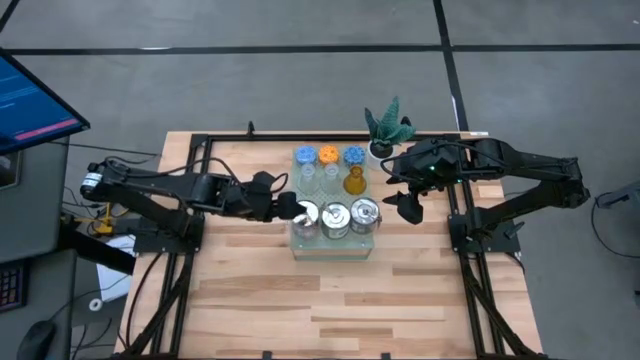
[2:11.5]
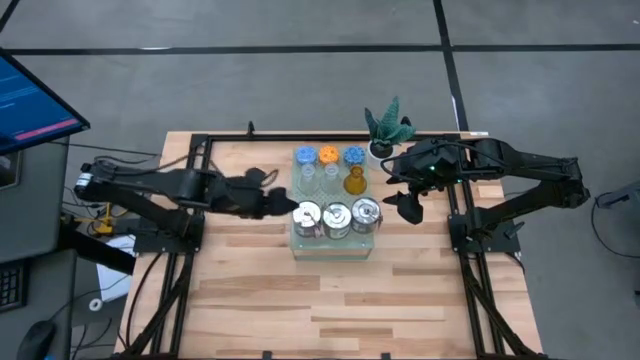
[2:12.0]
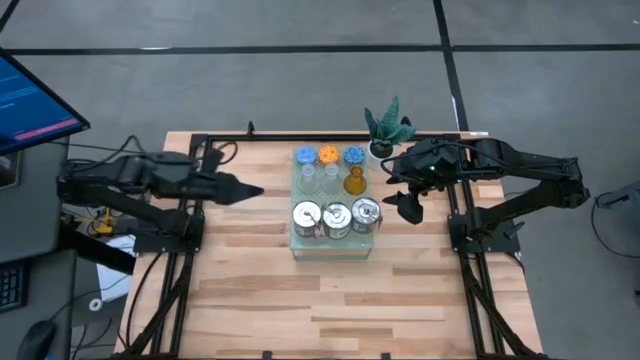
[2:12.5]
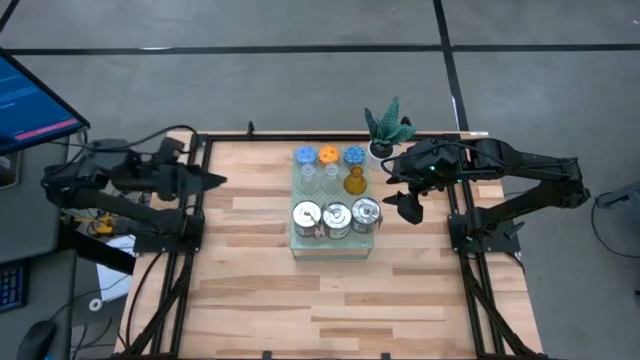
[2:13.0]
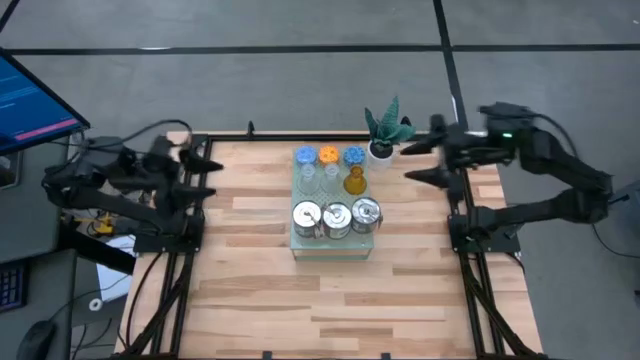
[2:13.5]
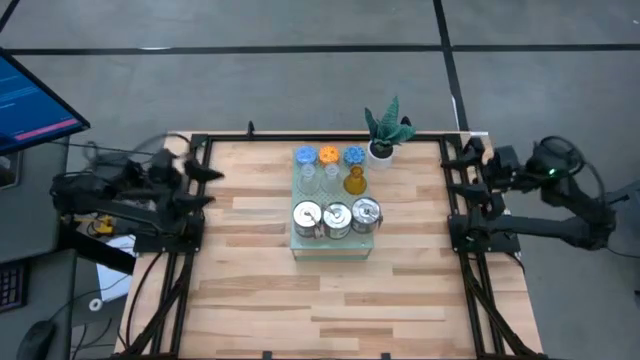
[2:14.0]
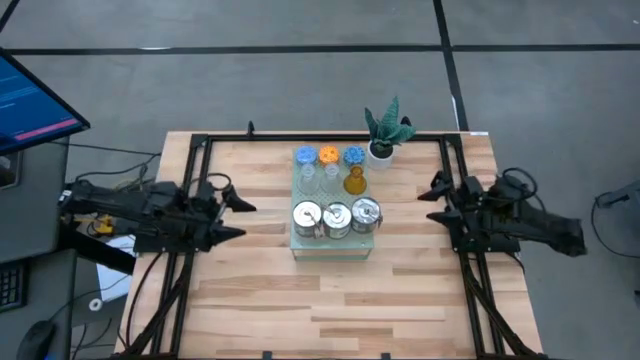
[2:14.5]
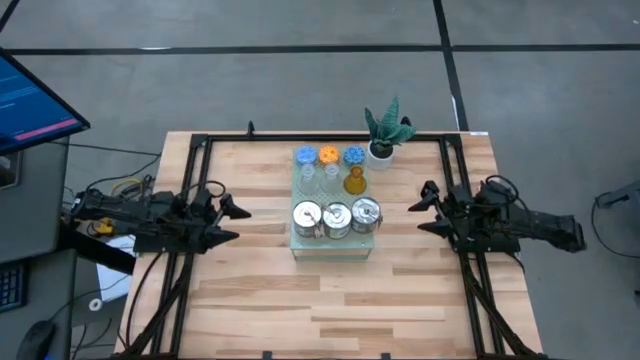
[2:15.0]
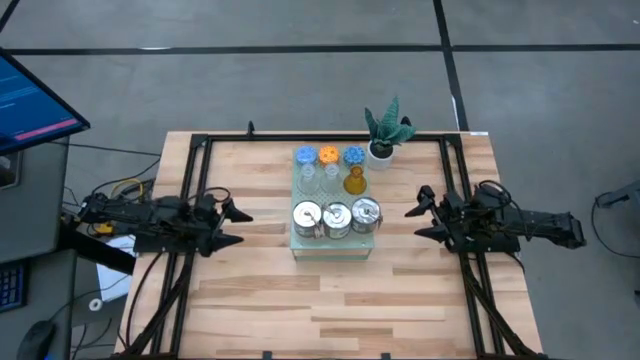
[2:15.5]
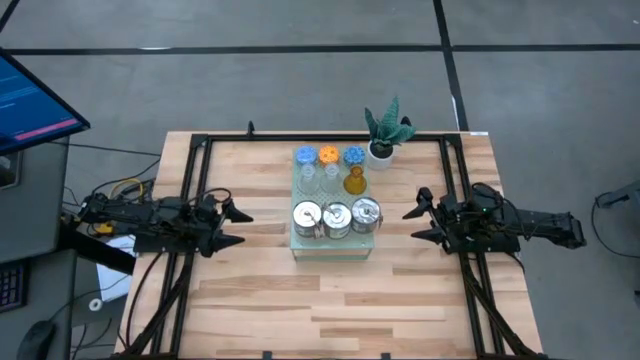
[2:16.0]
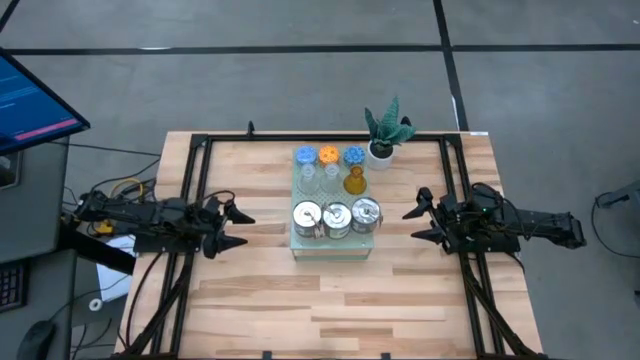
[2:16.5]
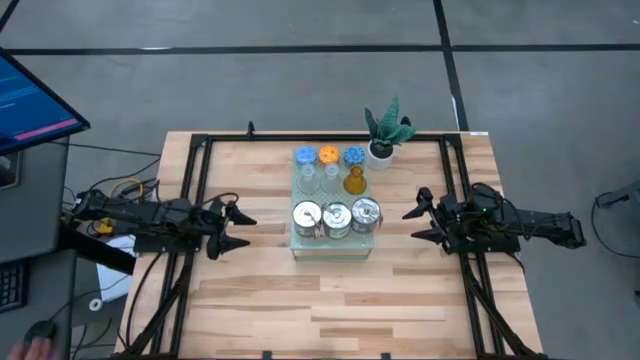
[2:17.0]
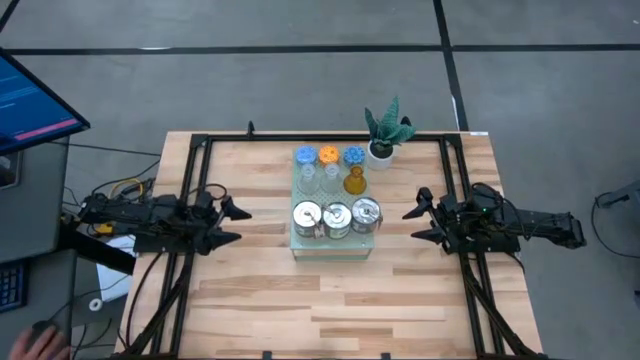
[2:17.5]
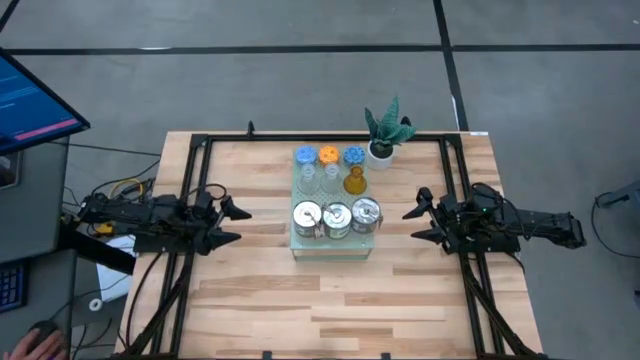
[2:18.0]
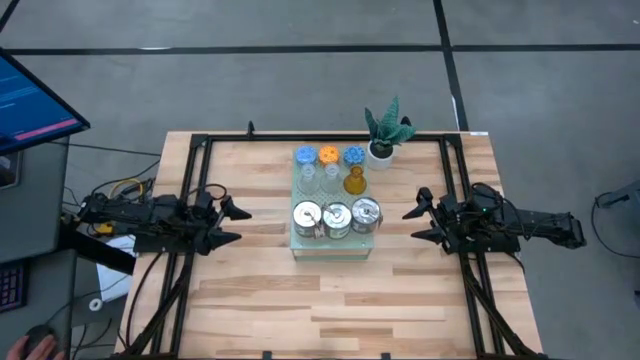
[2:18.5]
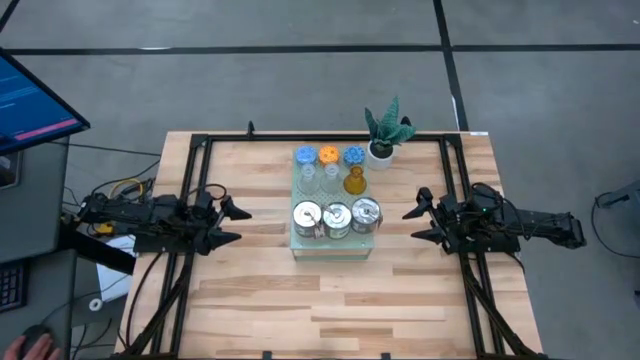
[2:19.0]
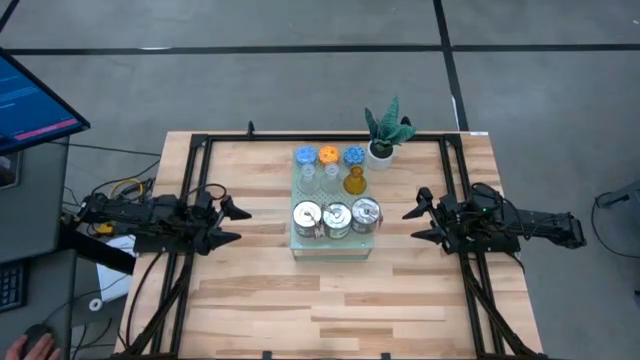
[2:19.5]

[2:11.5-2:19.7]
Task: Stock candles and holders on shelf
Return to Home Position

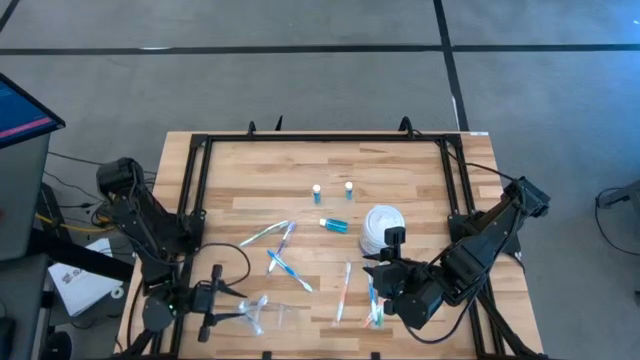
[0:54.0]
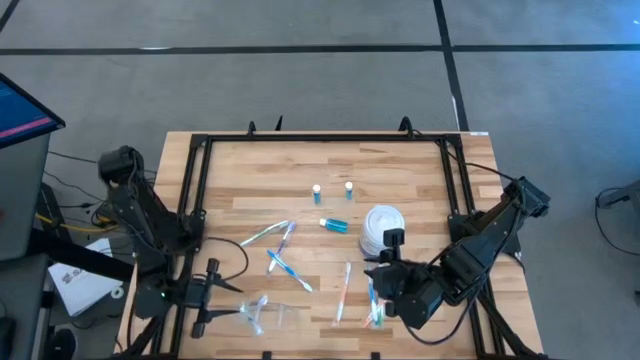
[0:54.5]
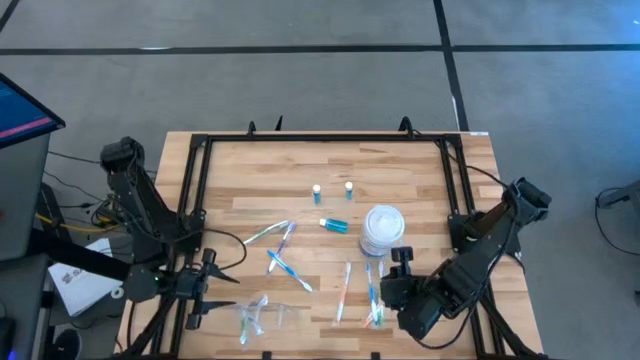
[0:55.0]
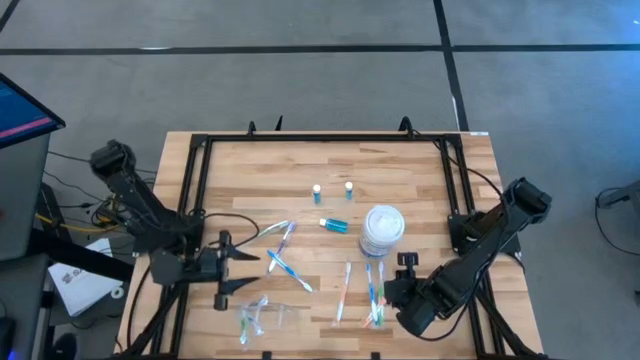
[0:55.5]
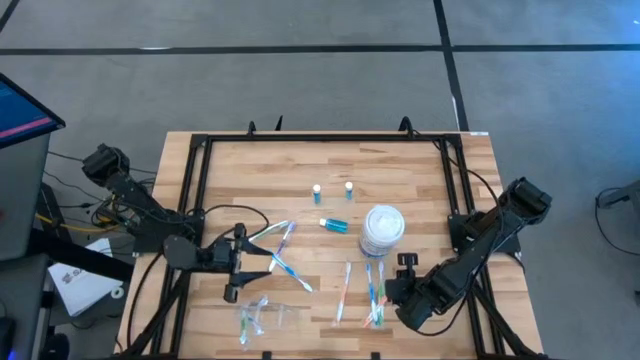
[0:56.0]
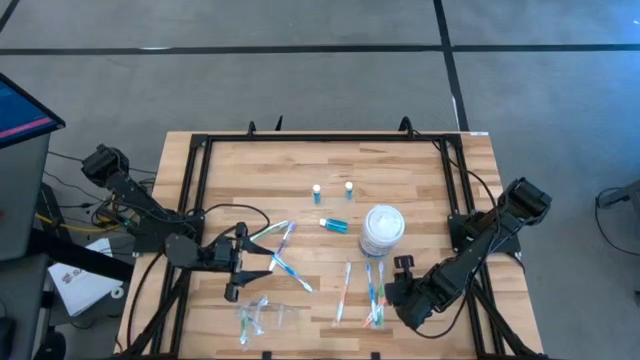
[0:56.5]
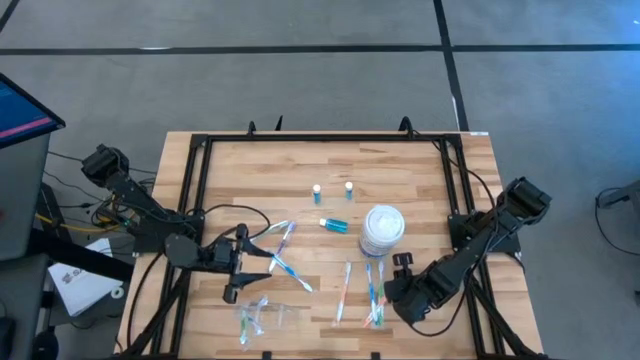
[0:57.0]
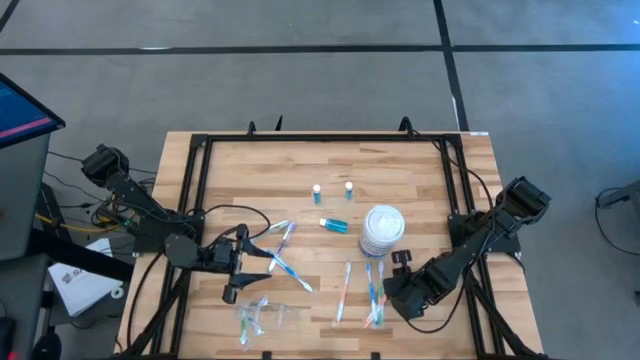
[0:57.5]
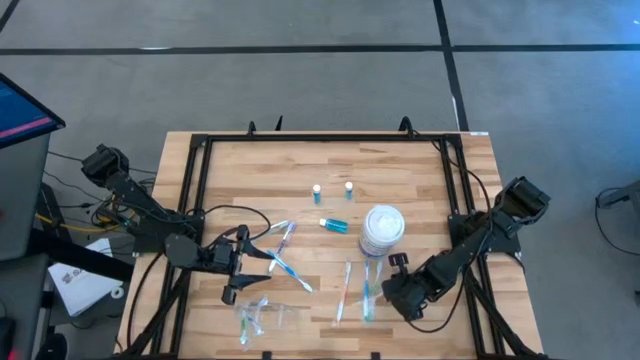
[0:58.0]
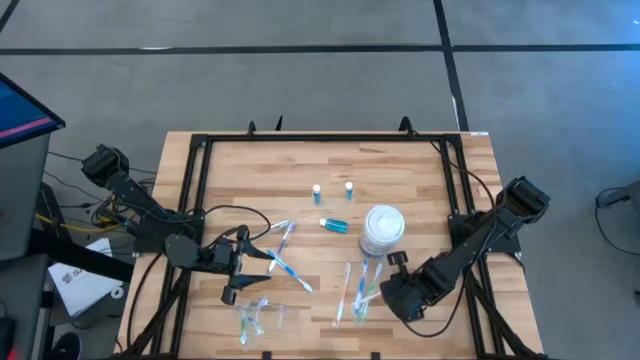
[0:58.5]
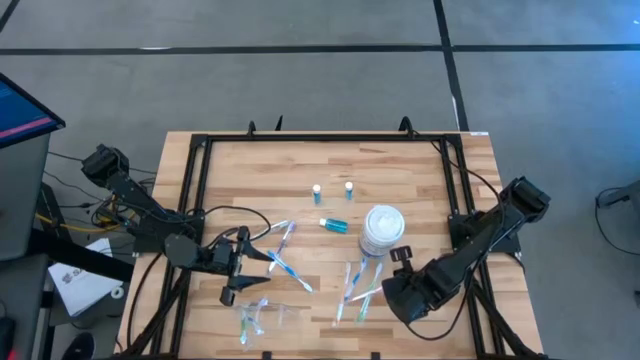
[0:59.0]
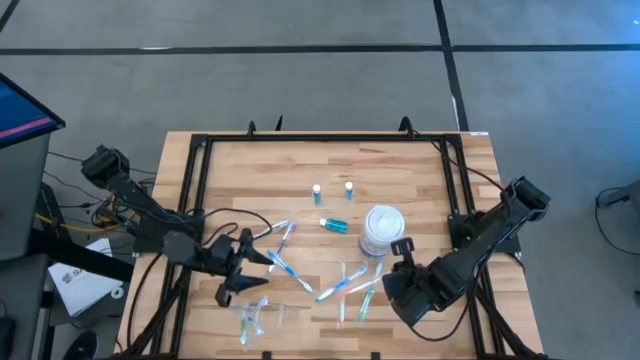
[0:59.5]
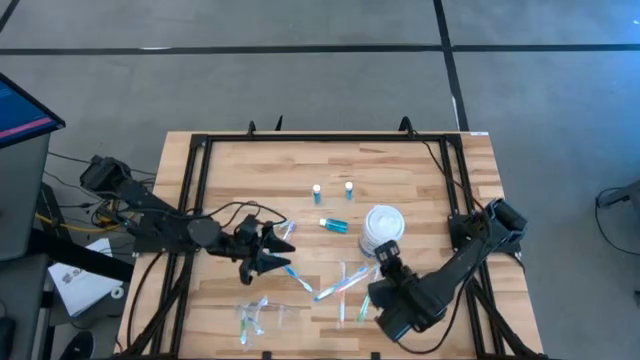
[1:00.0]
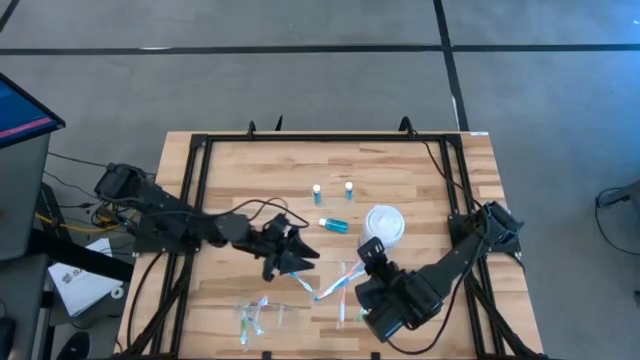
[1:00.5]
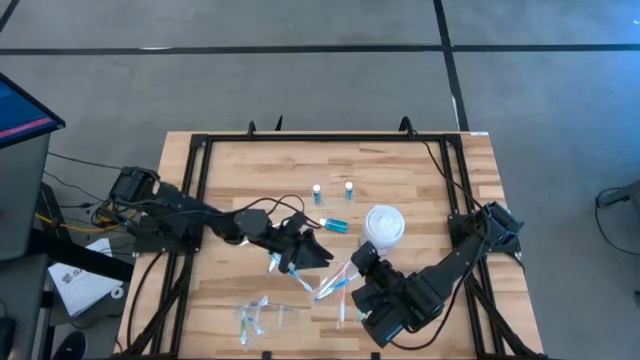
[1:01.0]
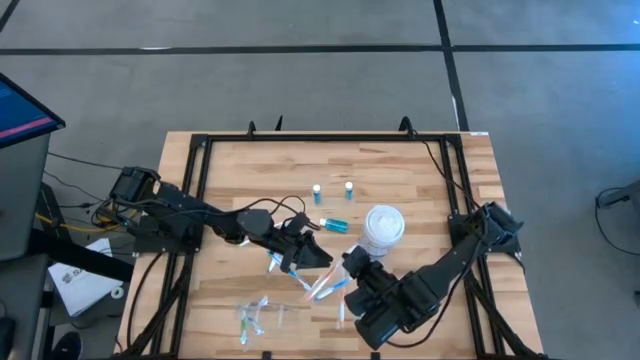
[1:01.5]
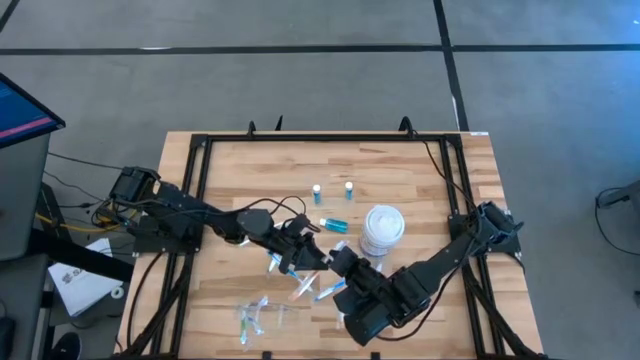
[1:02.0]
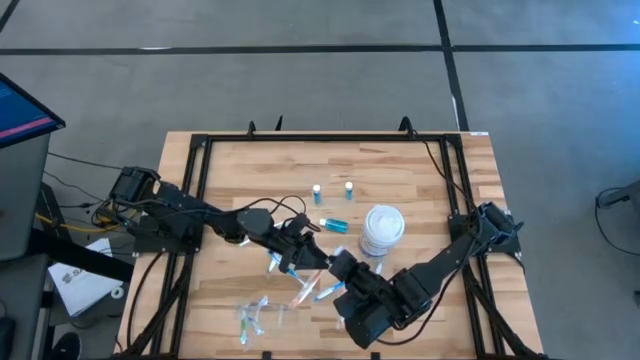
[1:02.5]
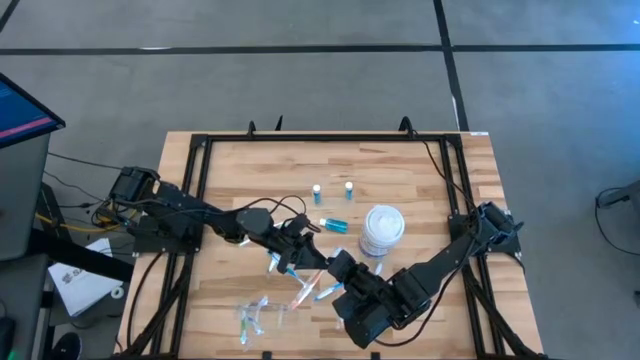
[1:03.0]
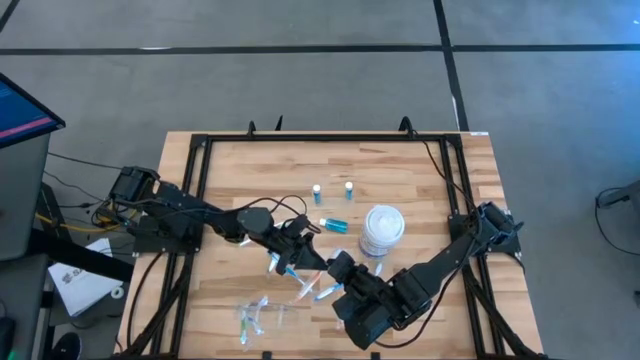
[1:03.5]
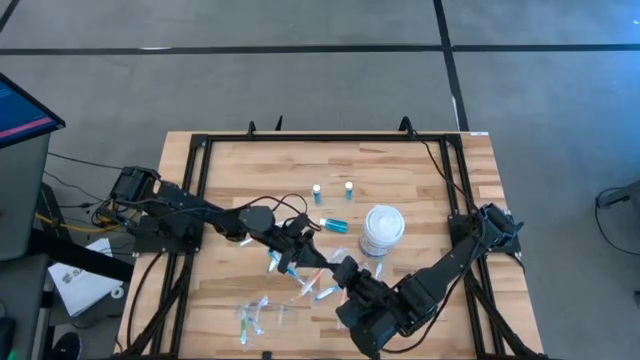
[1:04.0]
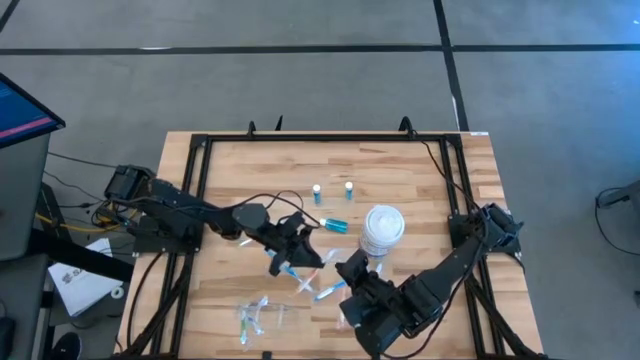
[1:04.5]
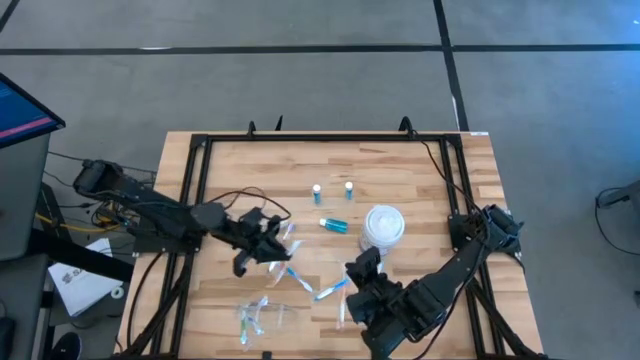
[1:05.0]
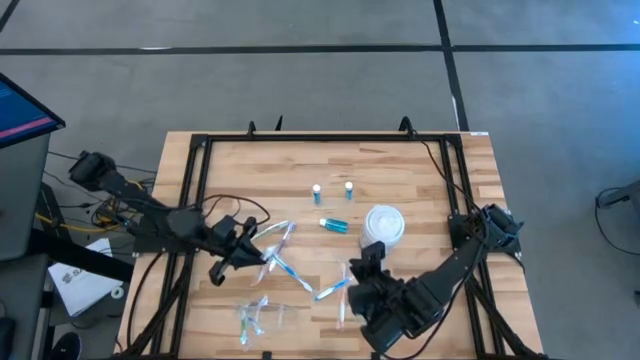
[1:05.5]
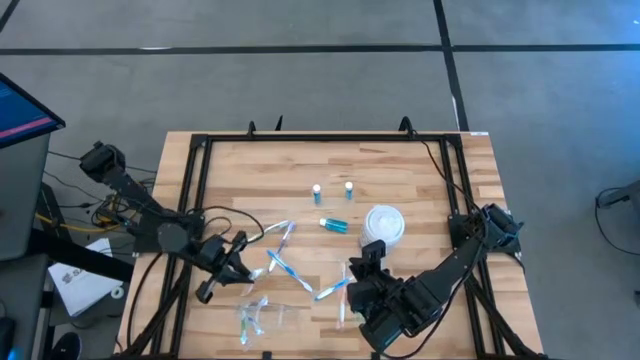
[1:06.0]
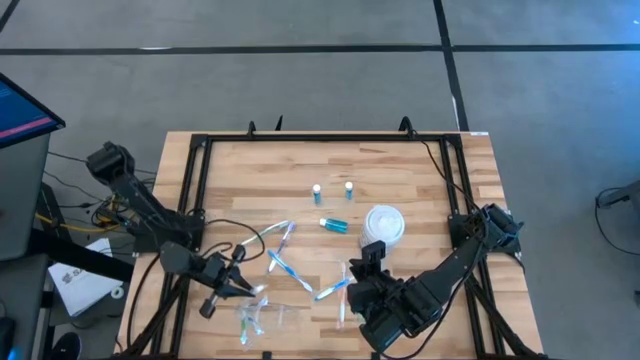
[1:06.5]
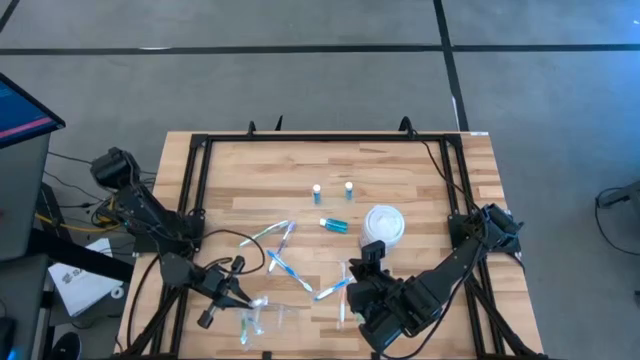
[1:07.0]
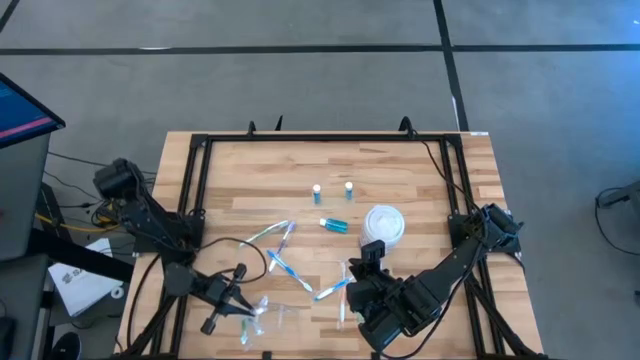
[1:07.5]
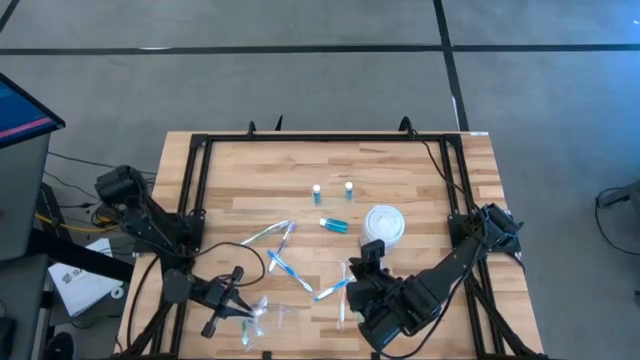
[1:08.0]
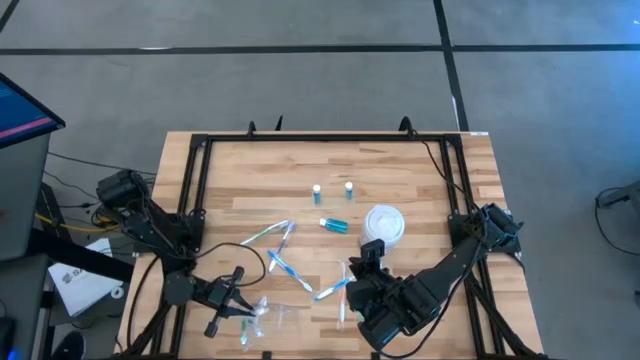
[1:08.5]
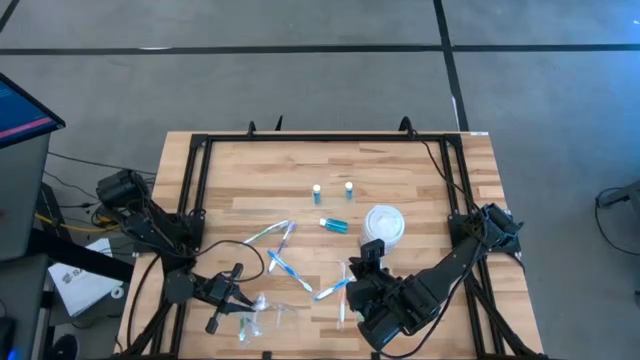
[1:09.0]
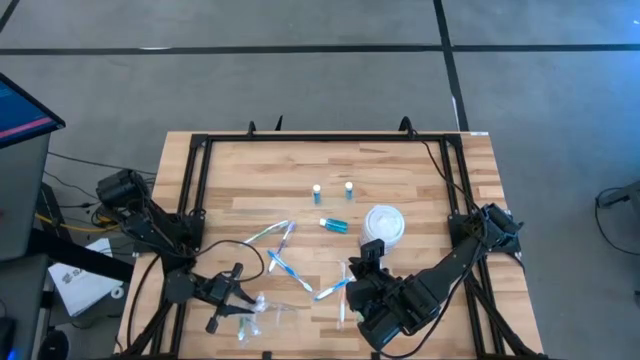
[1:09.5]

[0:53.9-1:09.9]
Task: Pick & Place toothbrushing station
Put the right orange toothbrush into the transparent organizer
